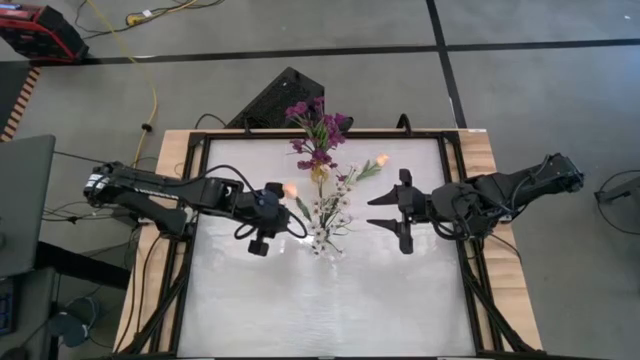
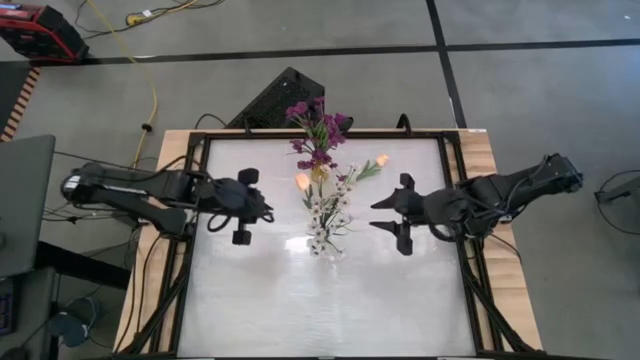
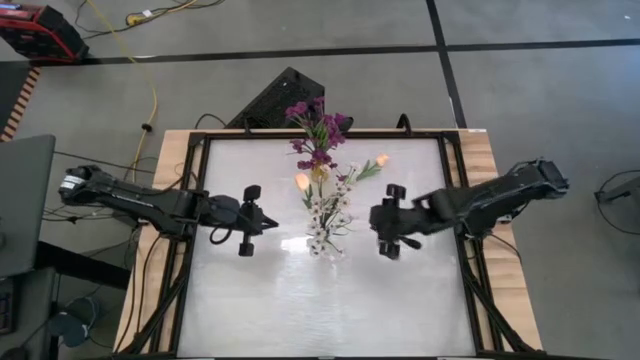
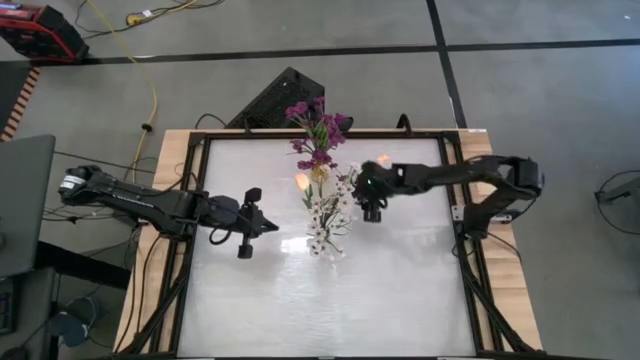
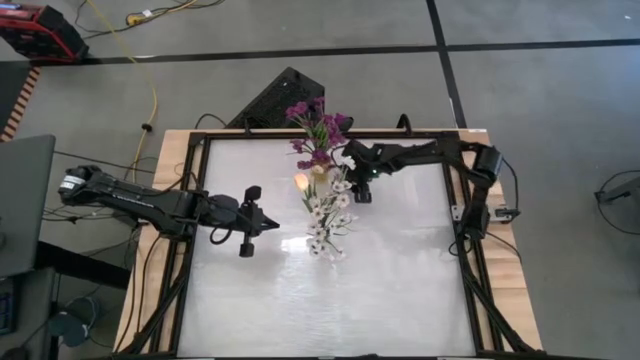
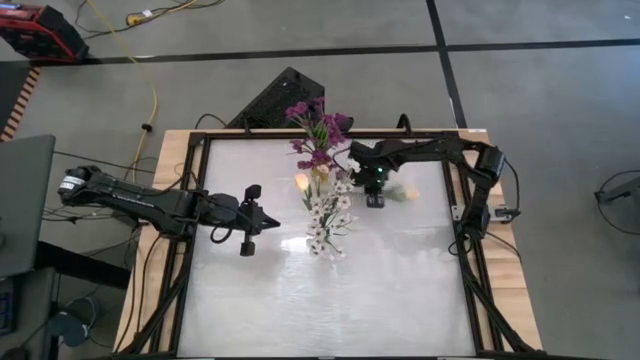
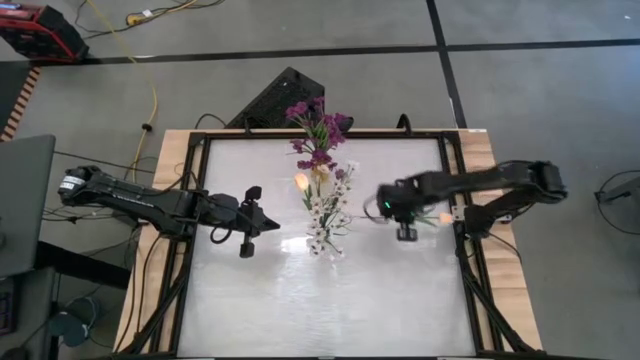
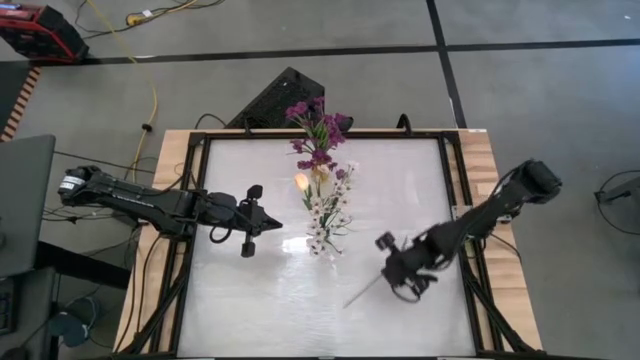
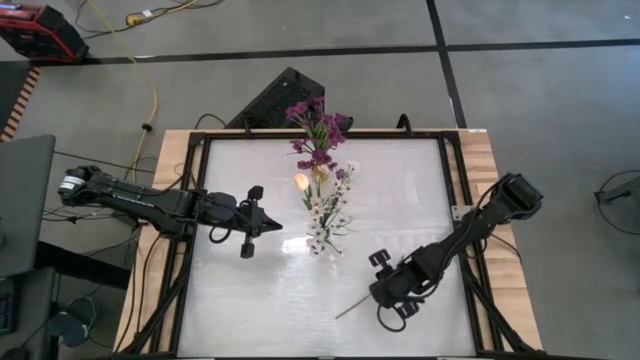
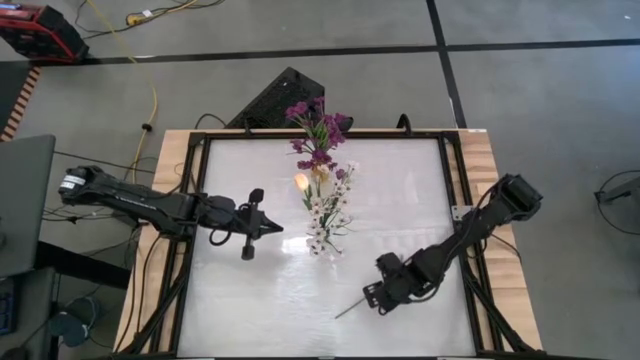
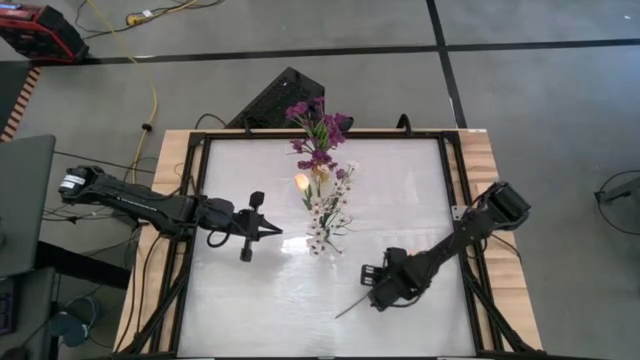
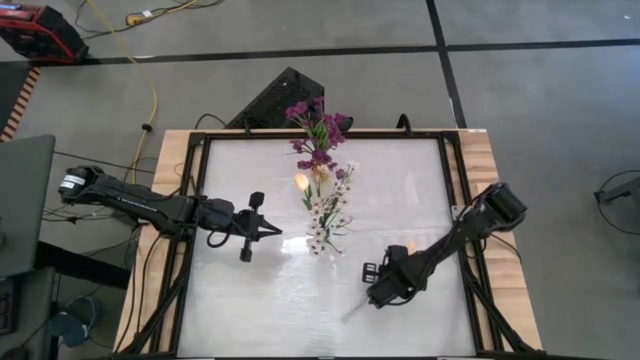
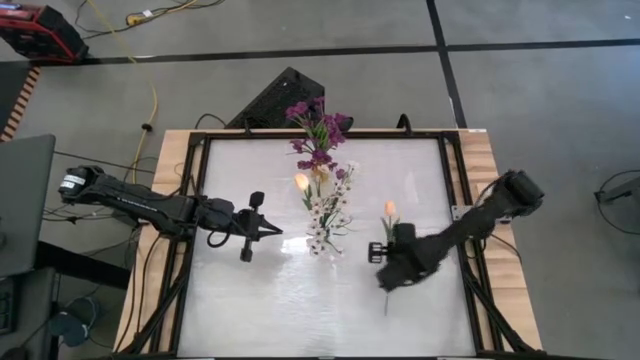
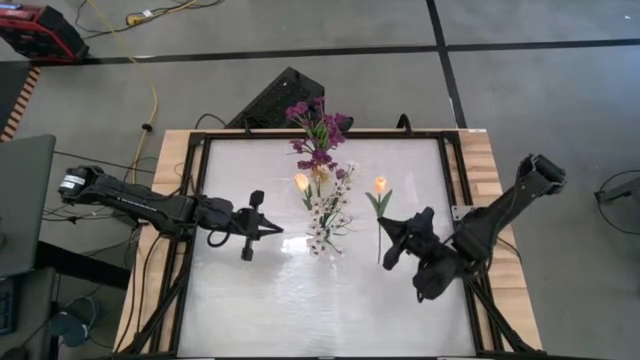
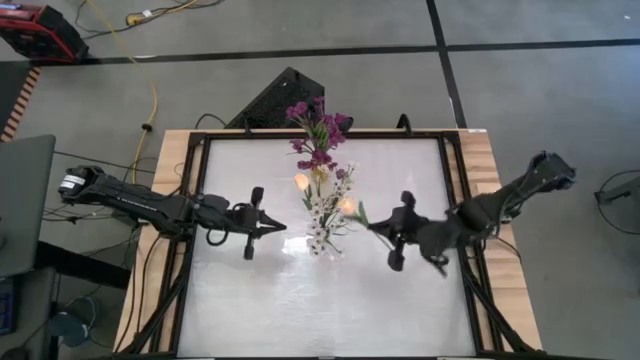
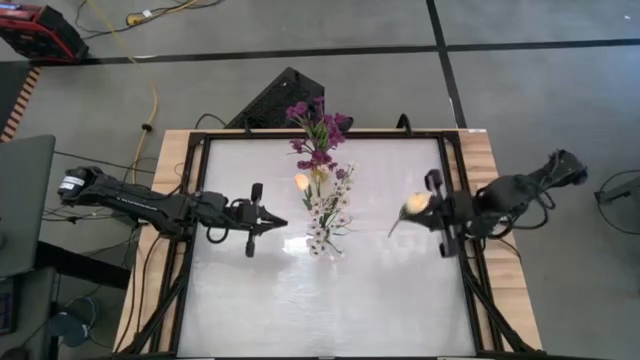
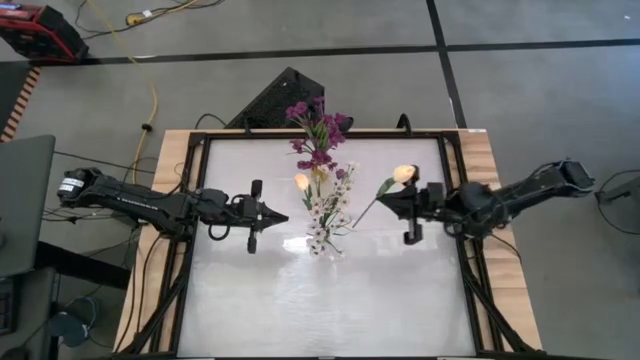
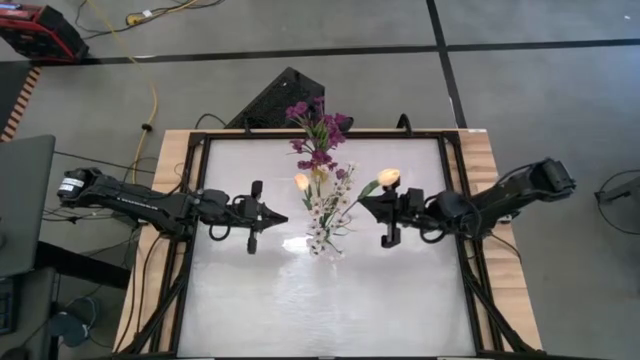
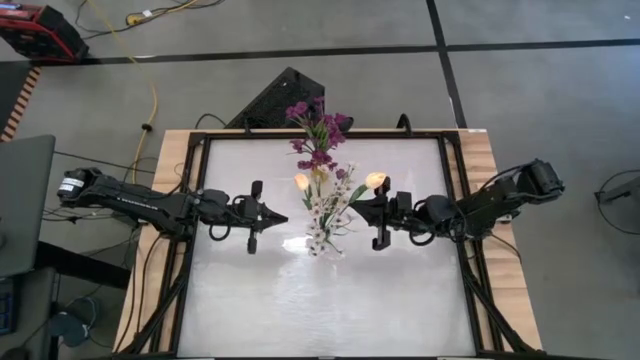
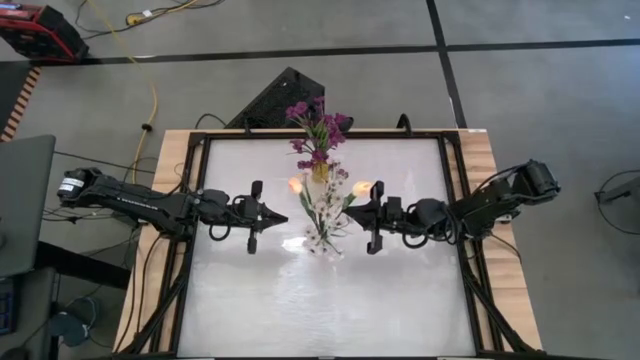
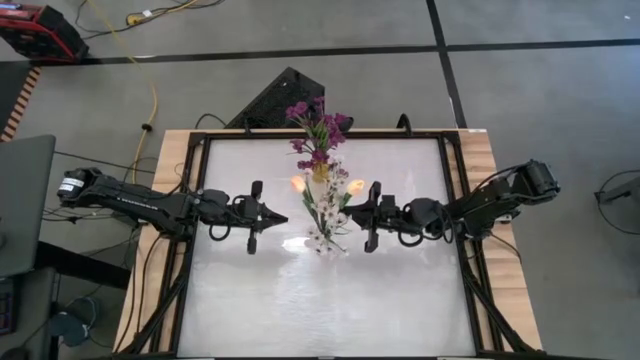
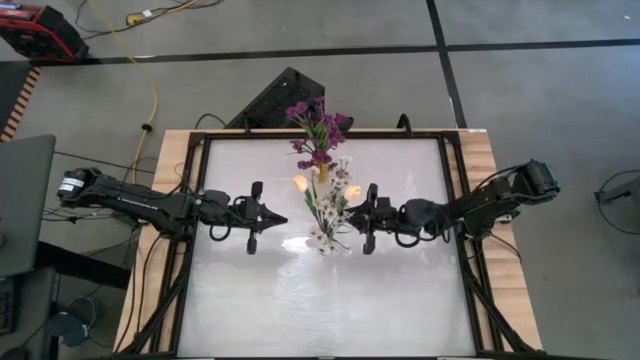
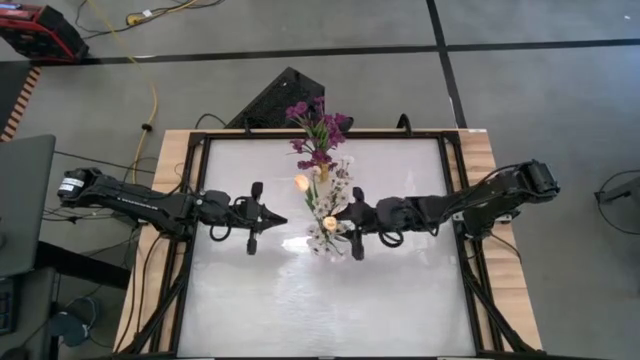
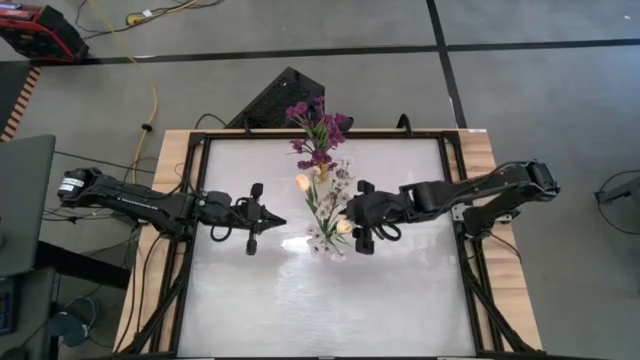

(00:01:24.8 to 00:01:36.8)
Task: Sort flowers into vase by color
Put the pink flower into the transparent vase

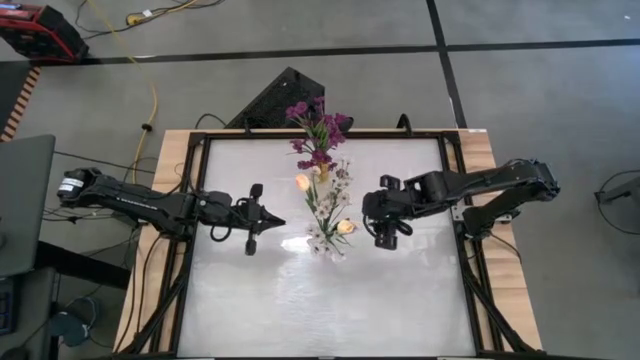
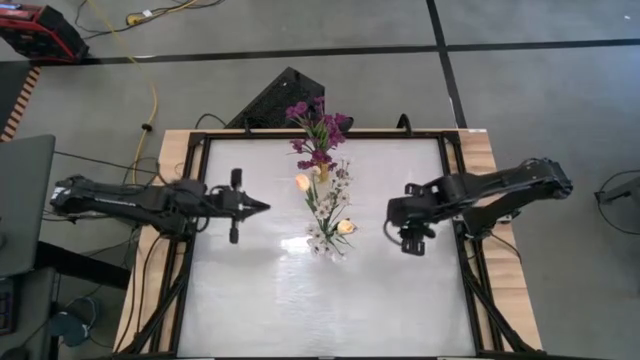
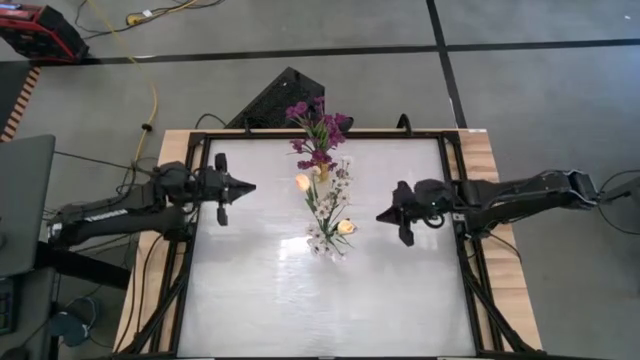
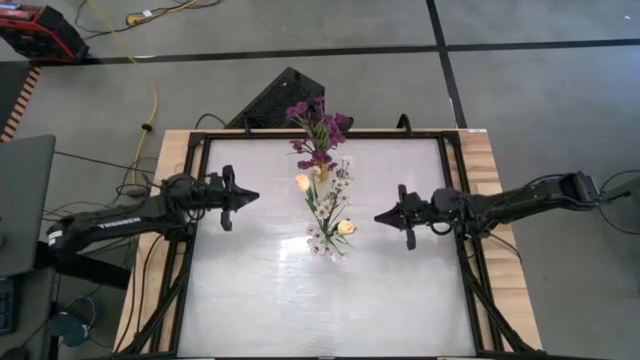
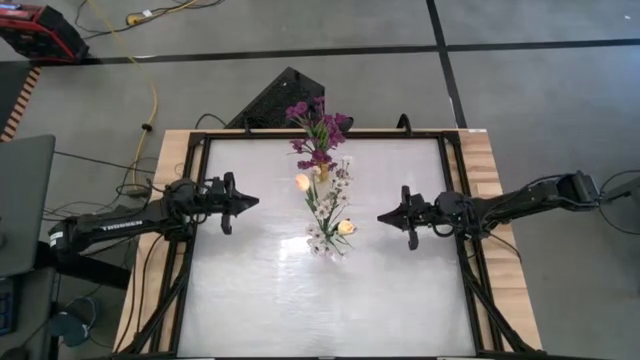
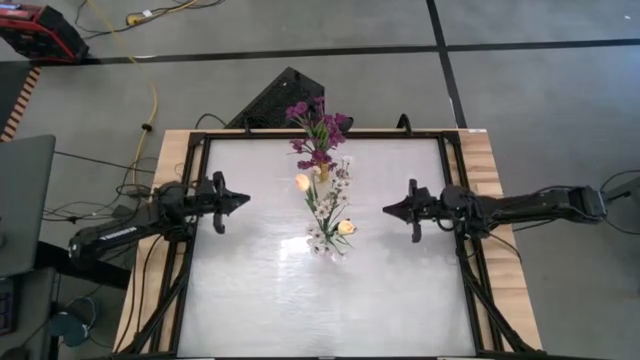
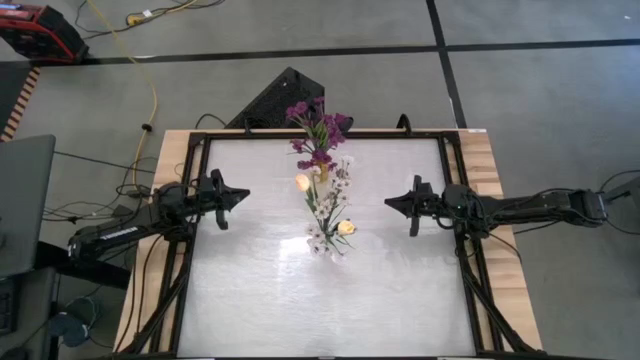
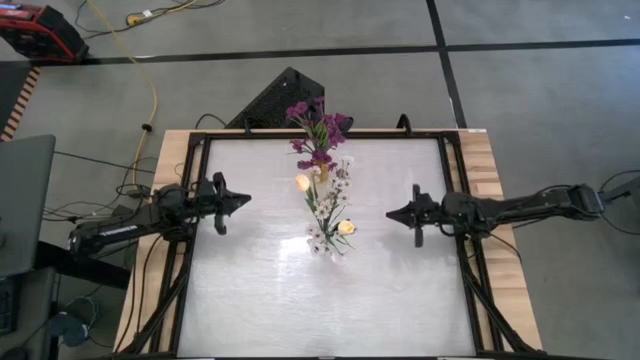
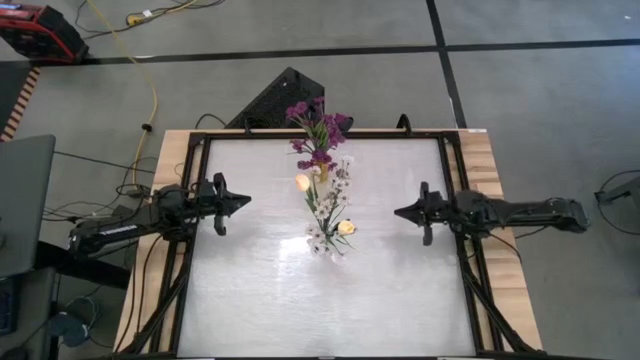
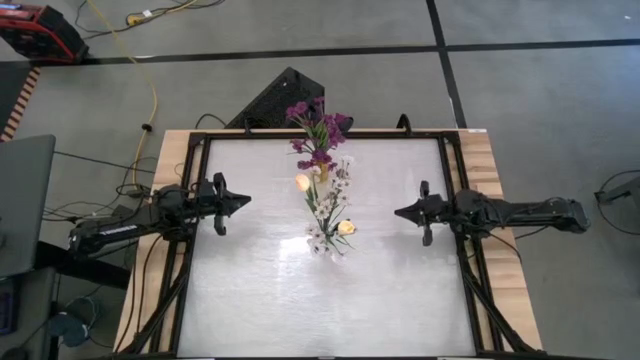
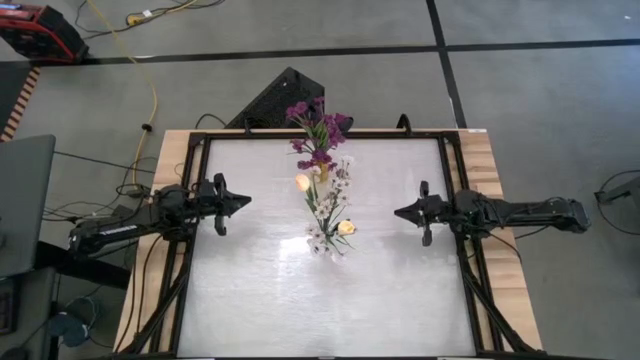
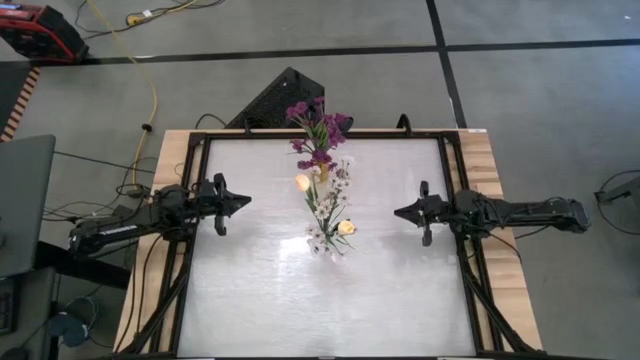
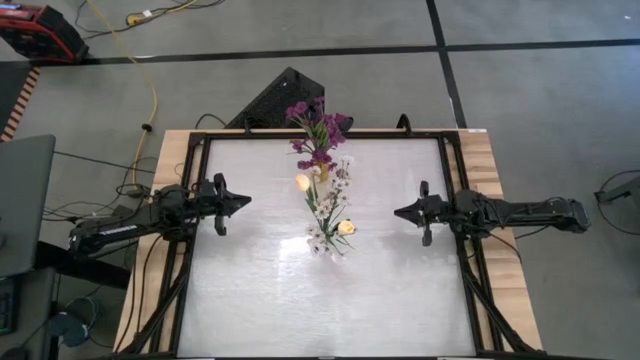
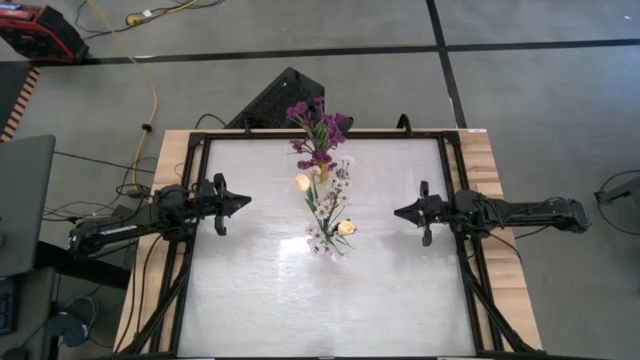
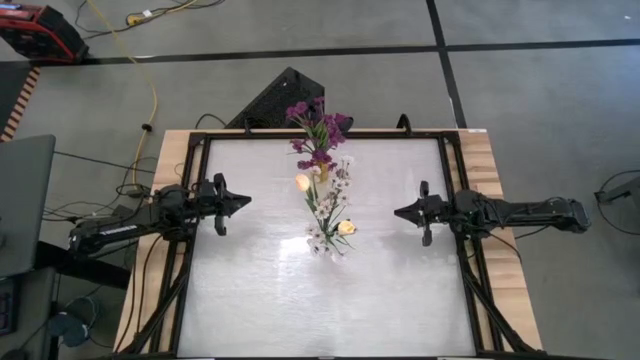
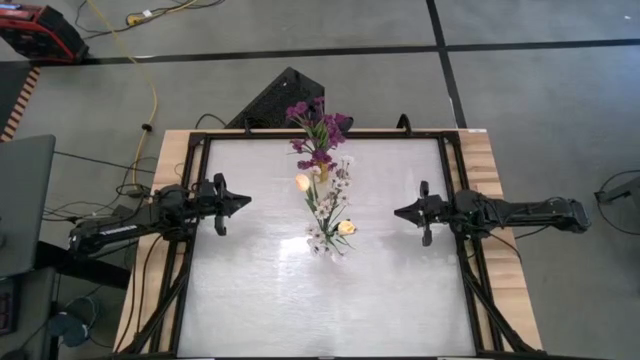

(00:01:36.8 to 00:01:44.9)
Return to Home Position
